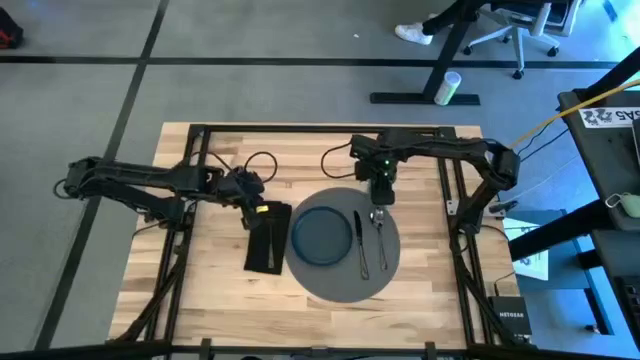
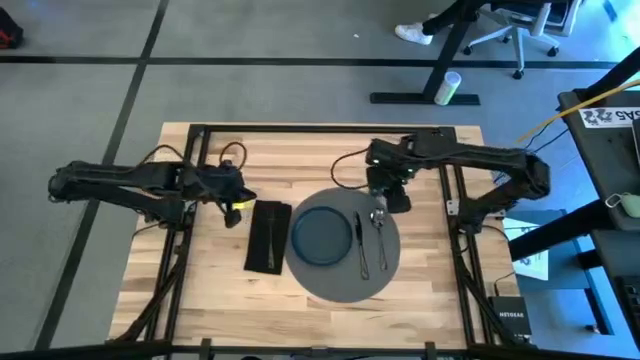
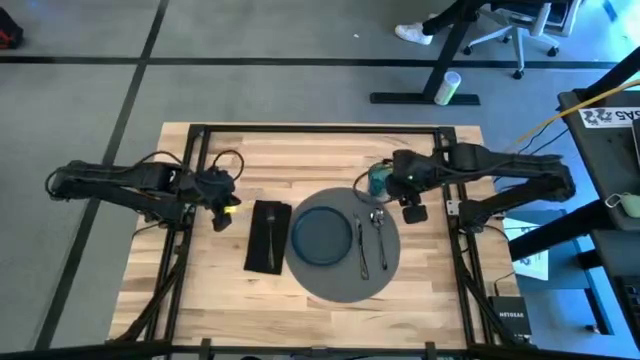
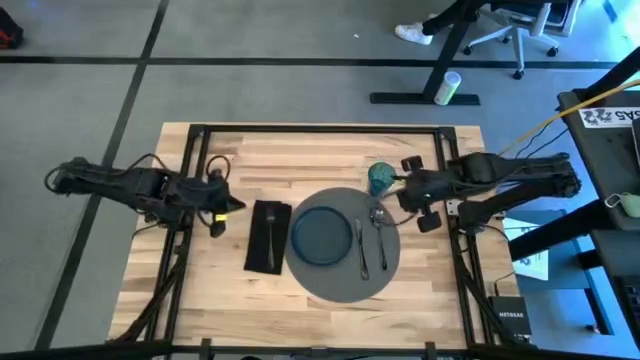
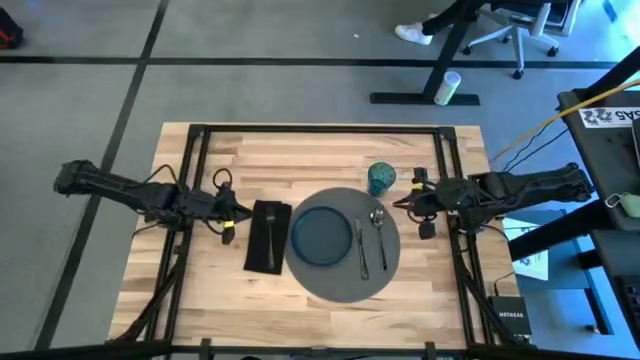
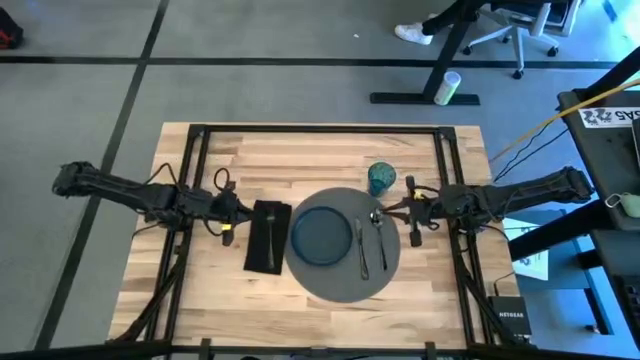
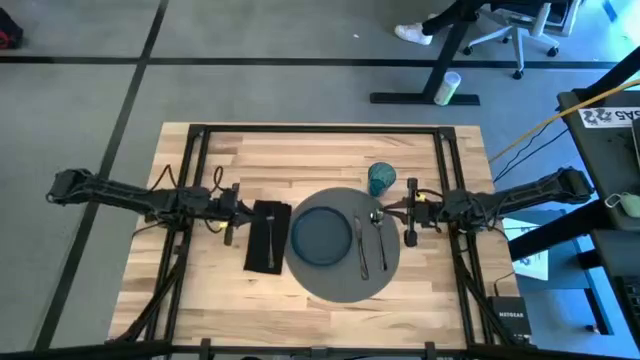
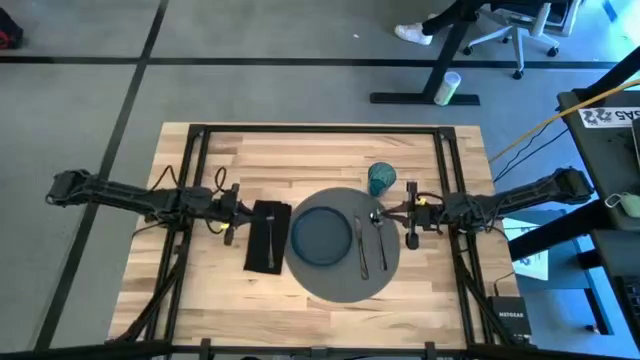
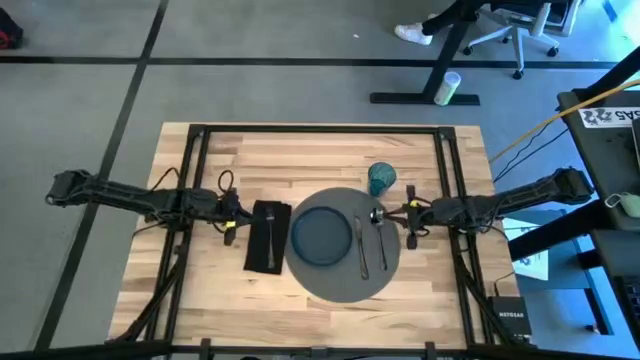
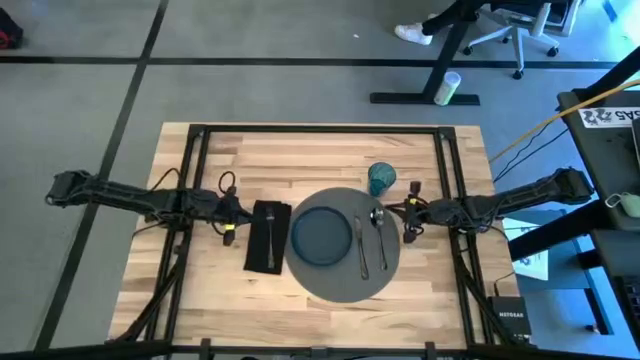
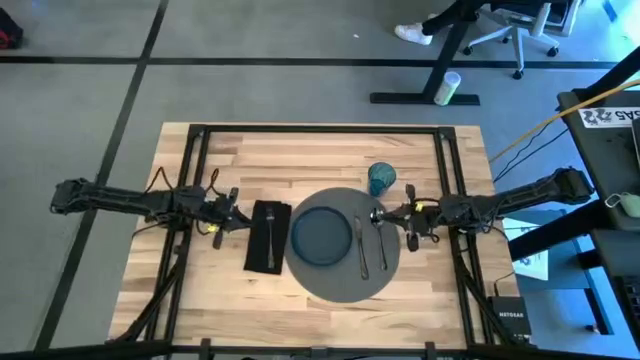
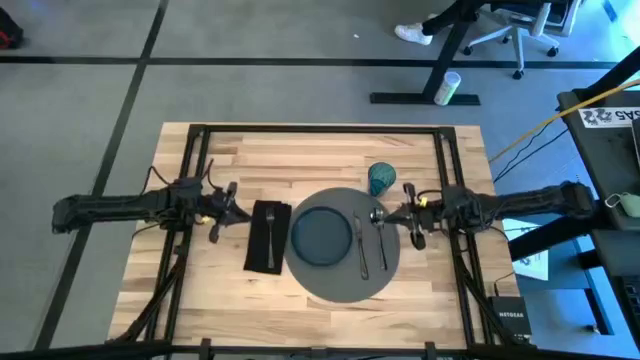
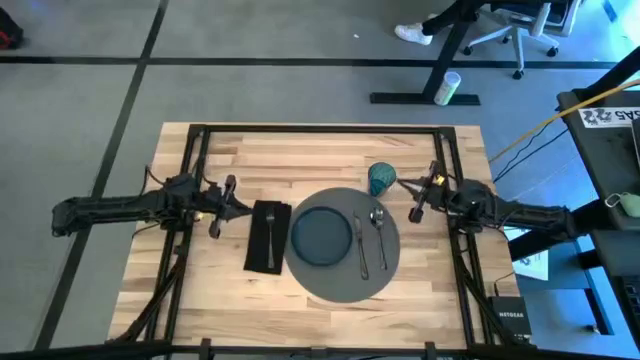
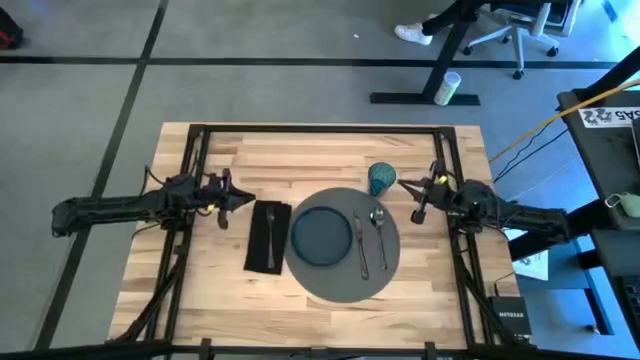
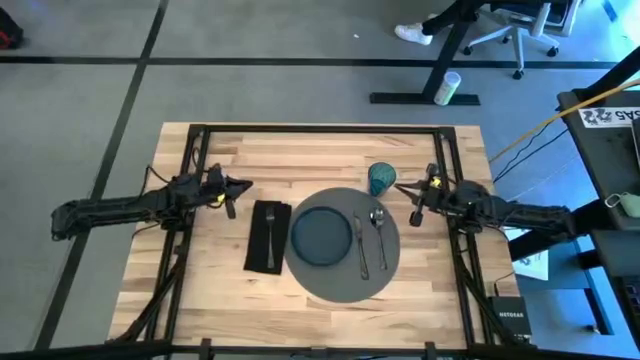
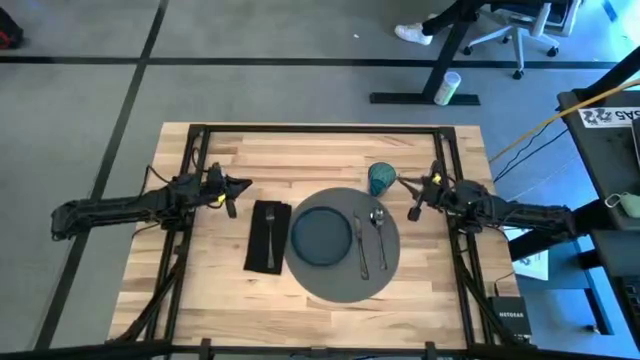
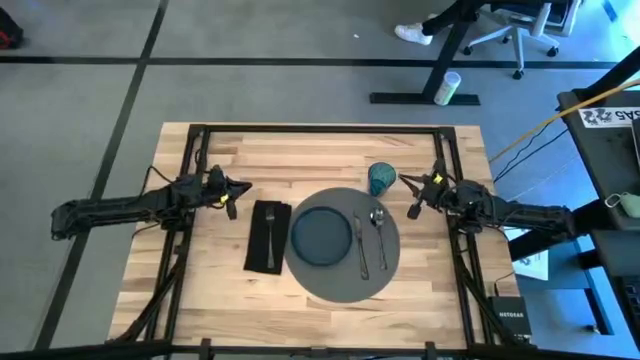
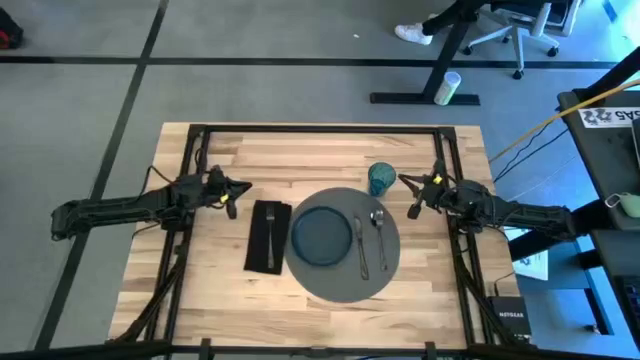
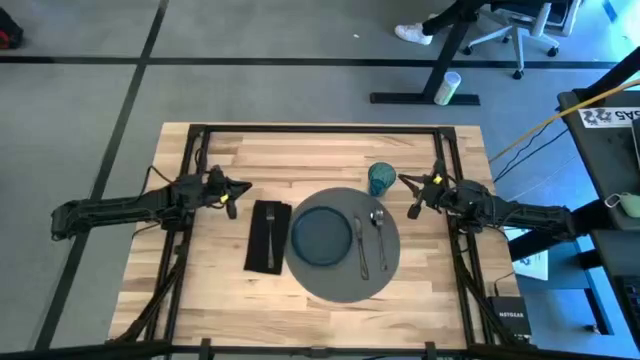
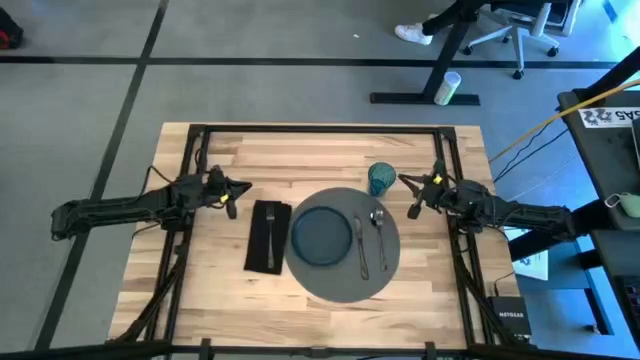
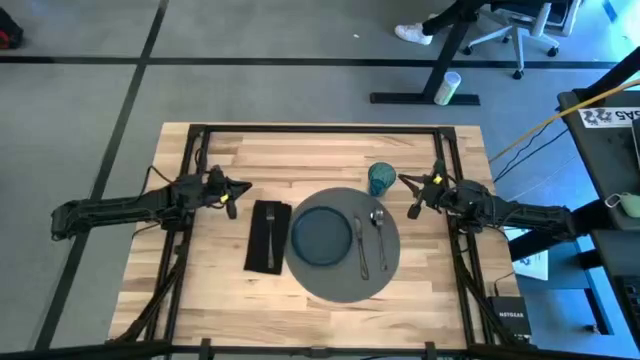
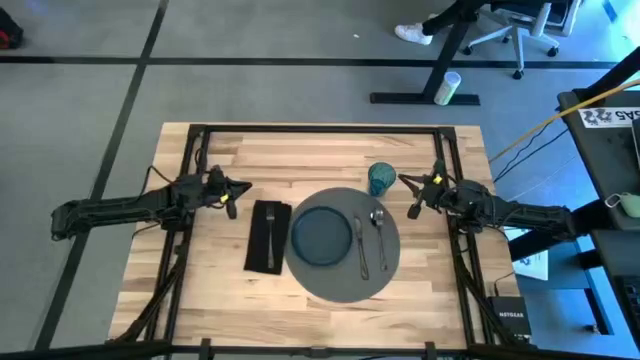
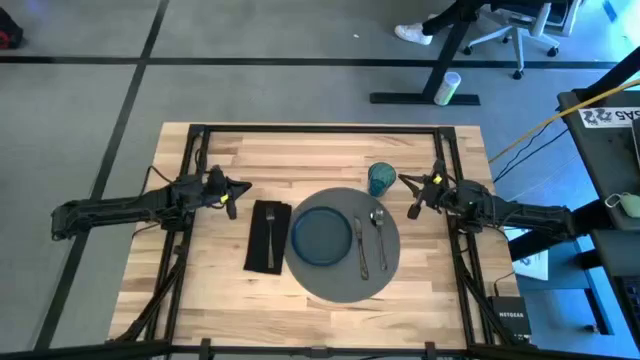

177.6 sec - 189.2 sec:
Task: Set table place
Return to Home Position

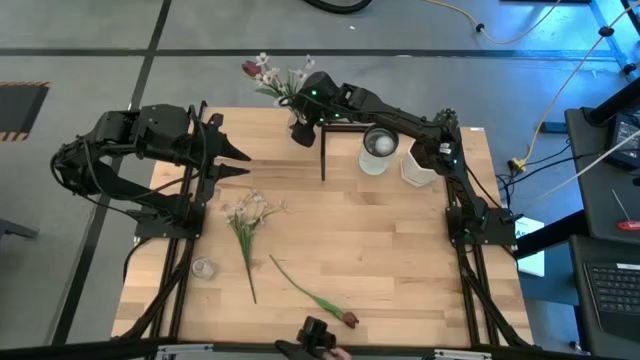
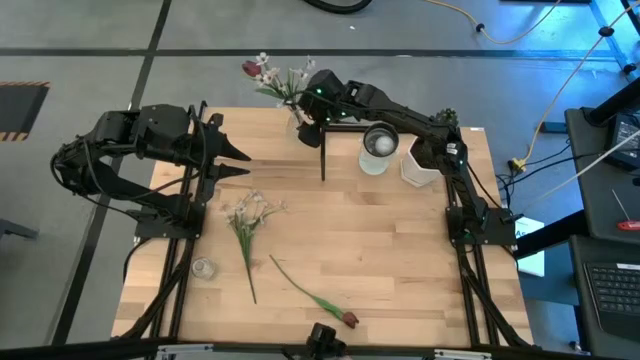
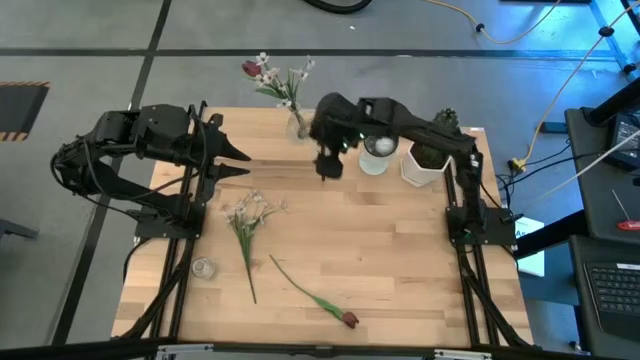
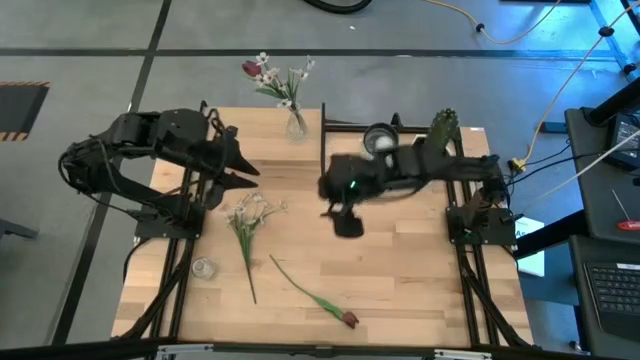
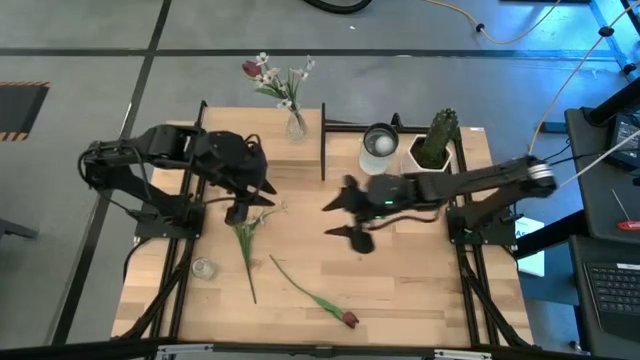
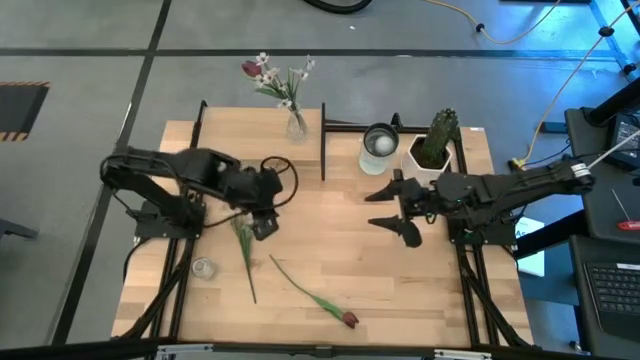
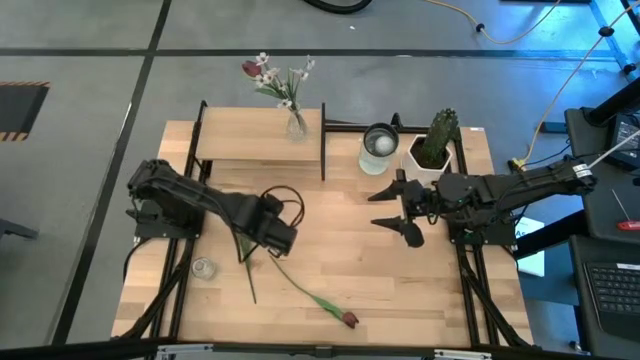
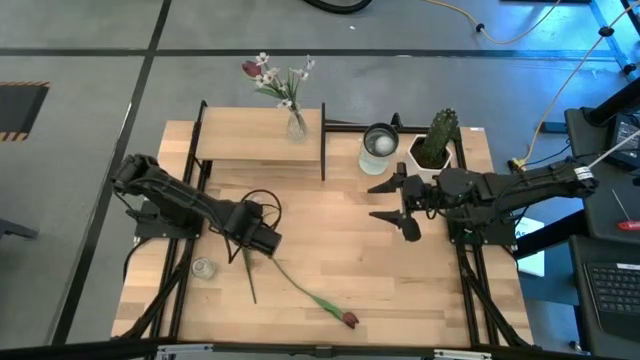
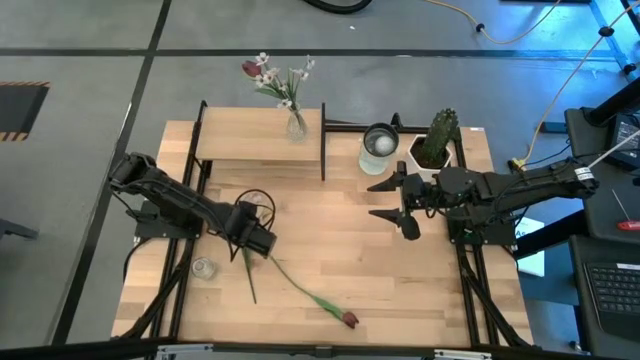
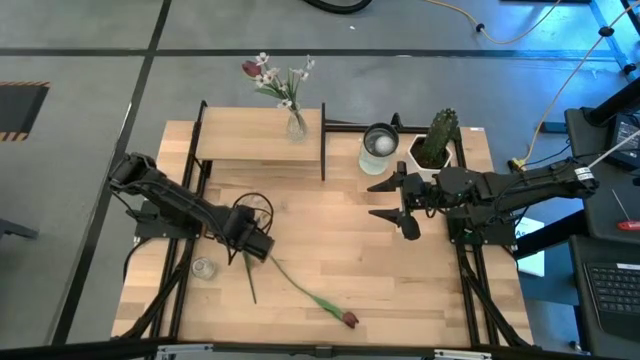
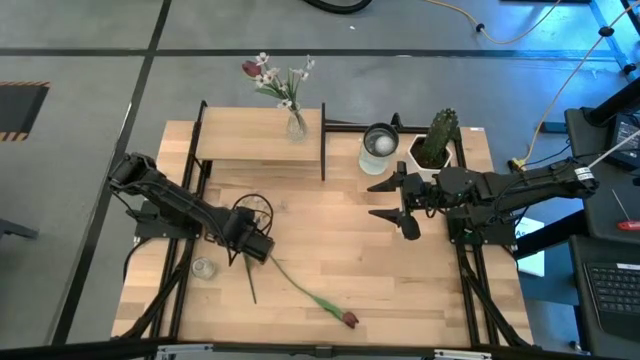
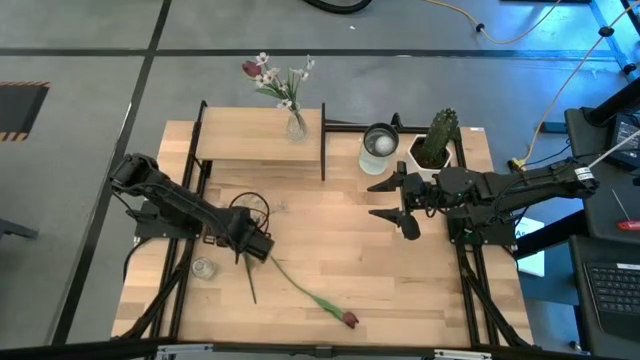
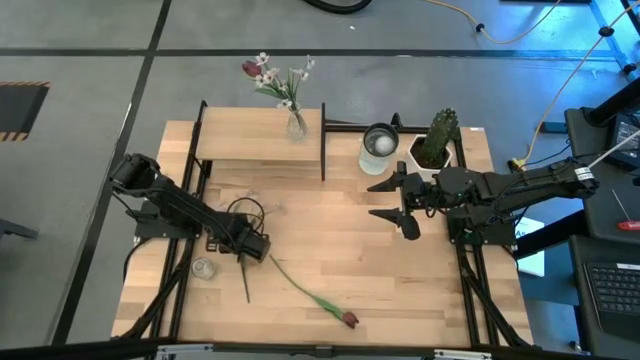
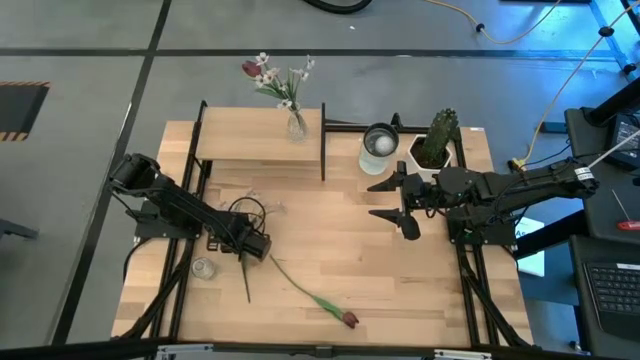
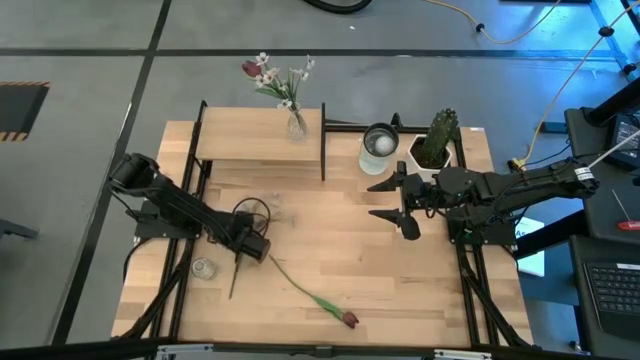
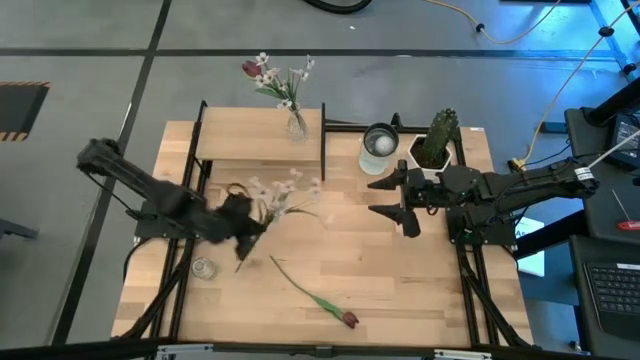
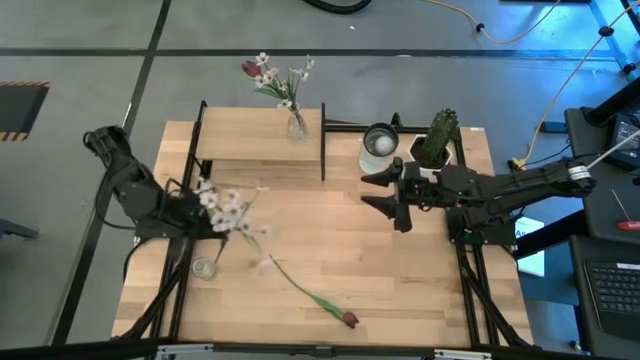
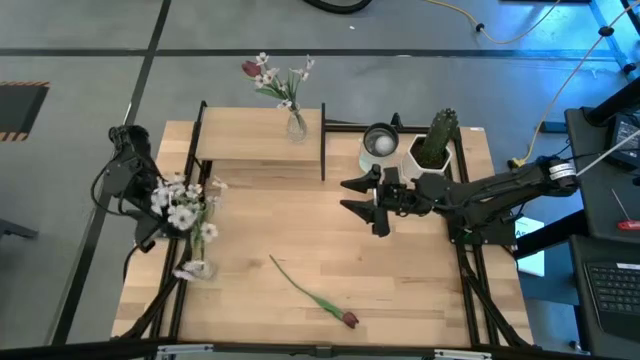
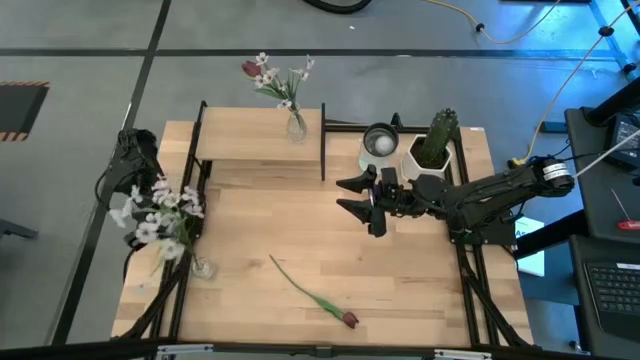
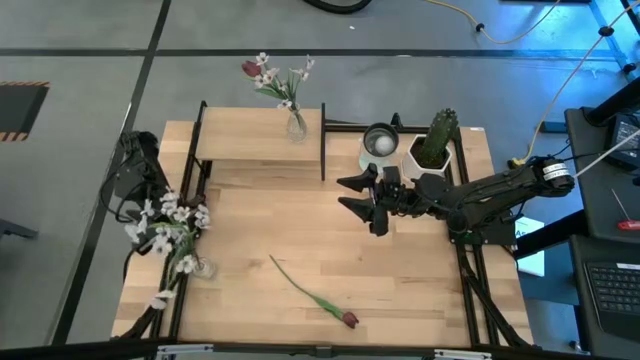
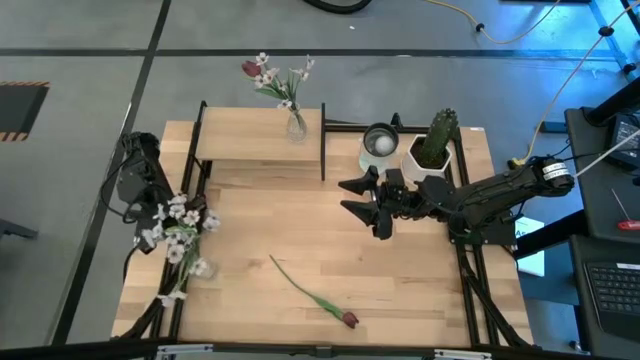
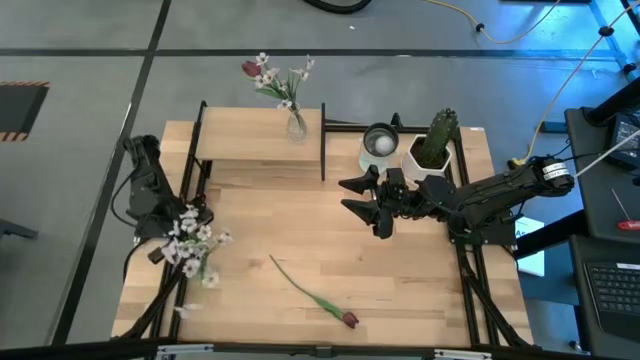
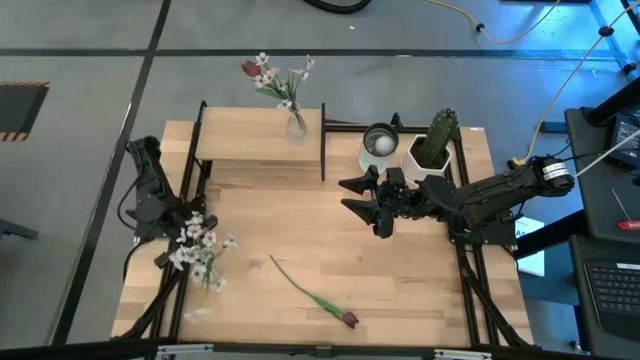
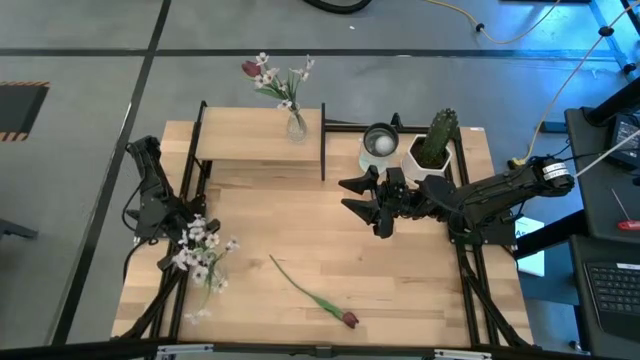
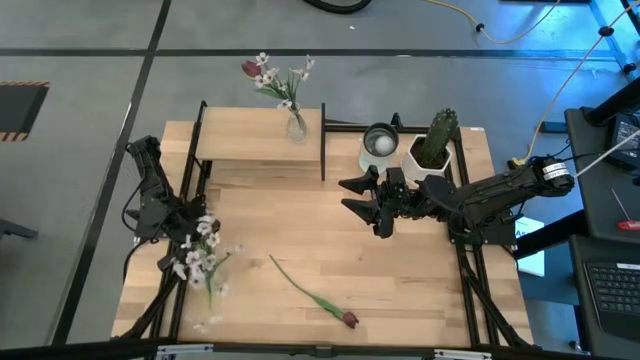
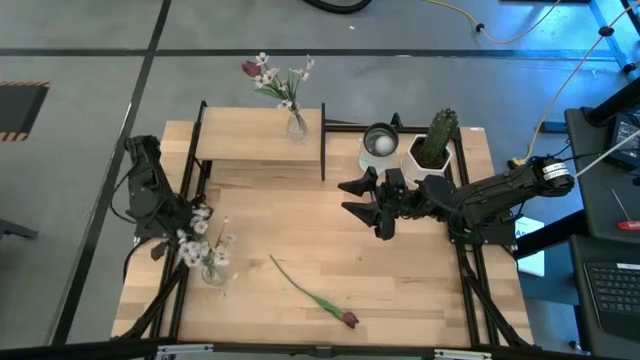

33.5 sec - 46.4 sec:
Task: Pick and place flowers into a vace then onto a shelf
Put the white flowers into the transparent vase
